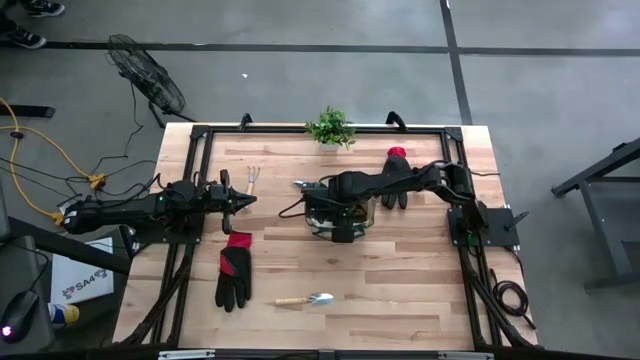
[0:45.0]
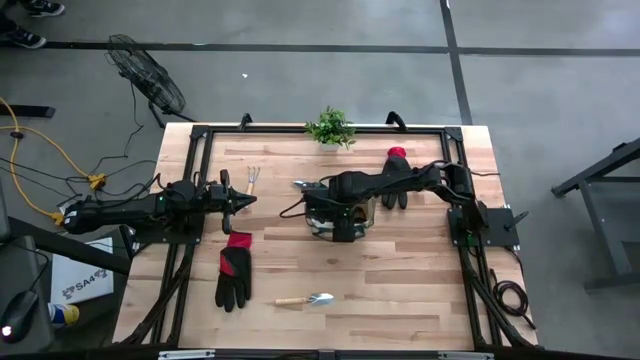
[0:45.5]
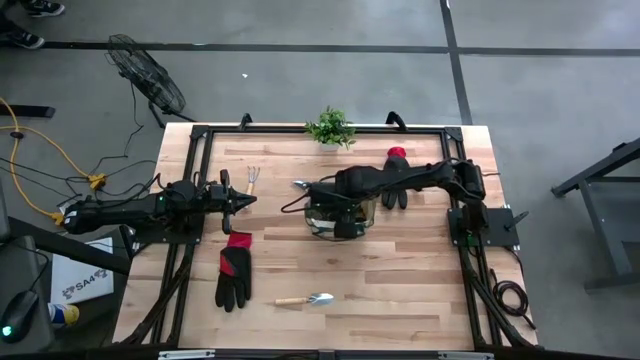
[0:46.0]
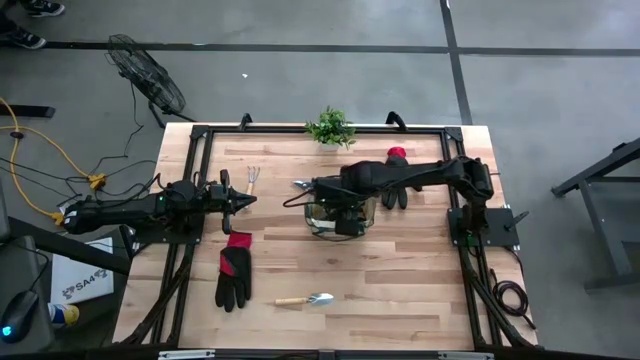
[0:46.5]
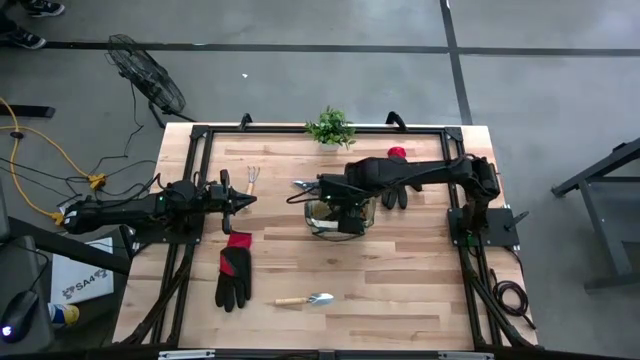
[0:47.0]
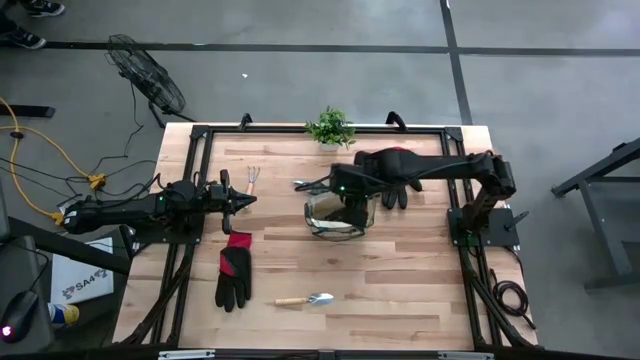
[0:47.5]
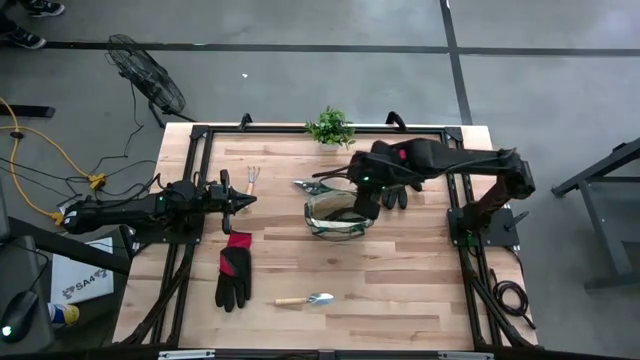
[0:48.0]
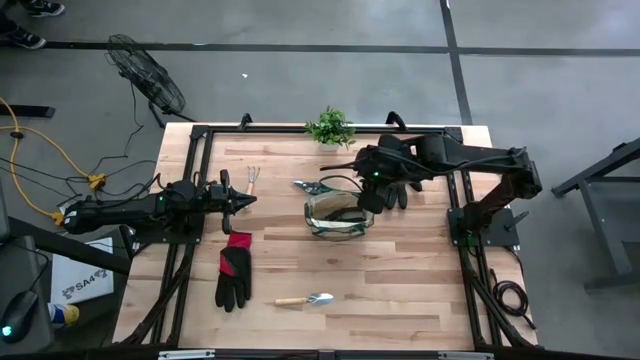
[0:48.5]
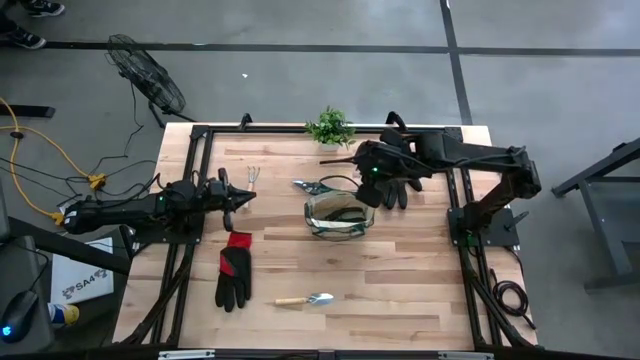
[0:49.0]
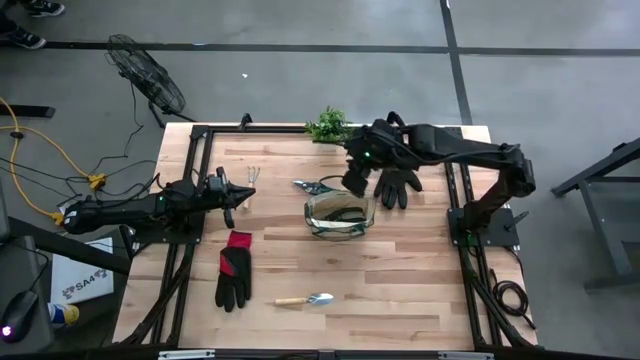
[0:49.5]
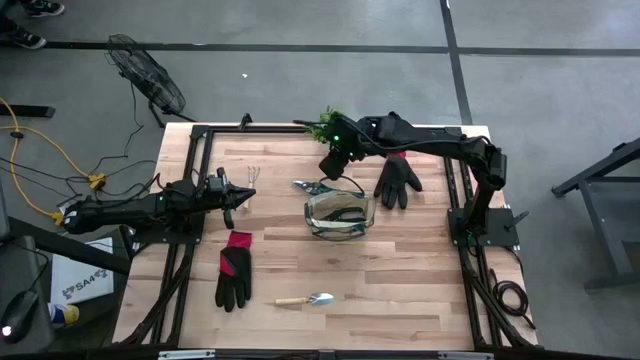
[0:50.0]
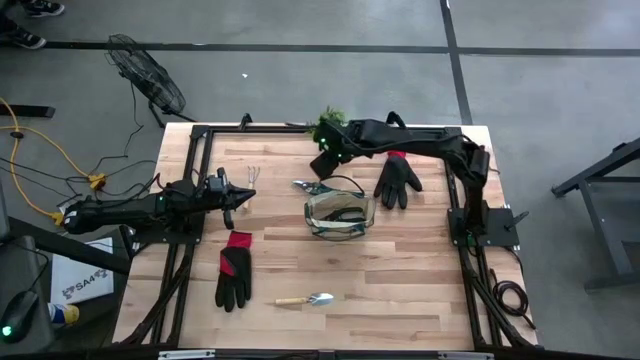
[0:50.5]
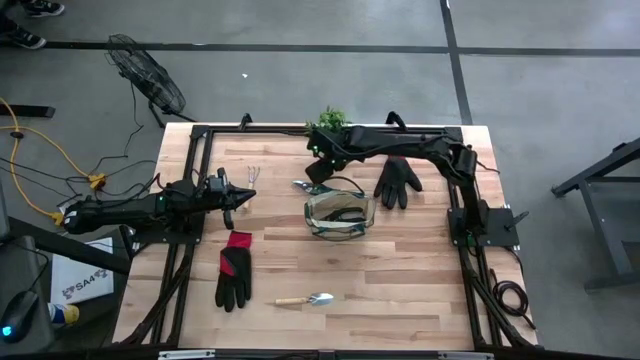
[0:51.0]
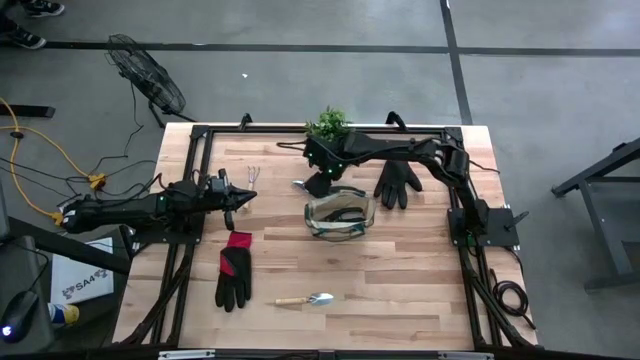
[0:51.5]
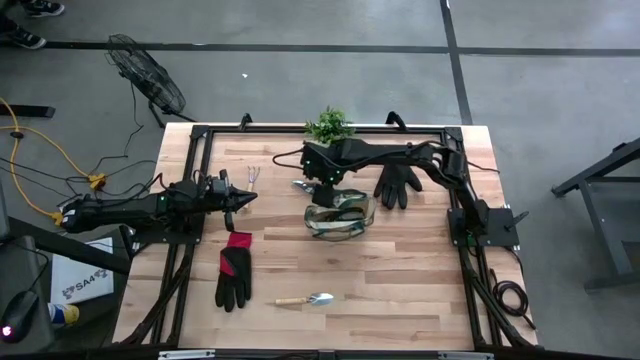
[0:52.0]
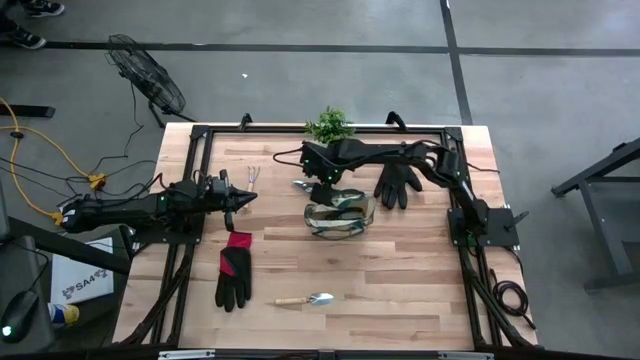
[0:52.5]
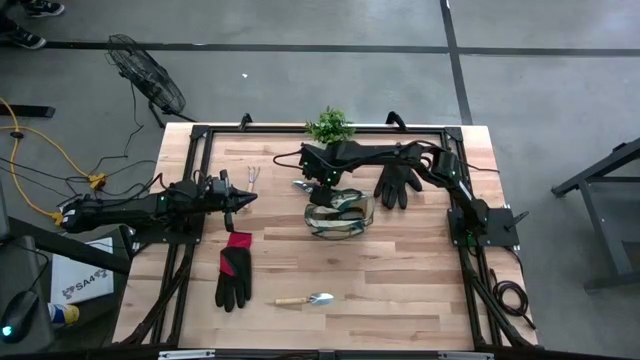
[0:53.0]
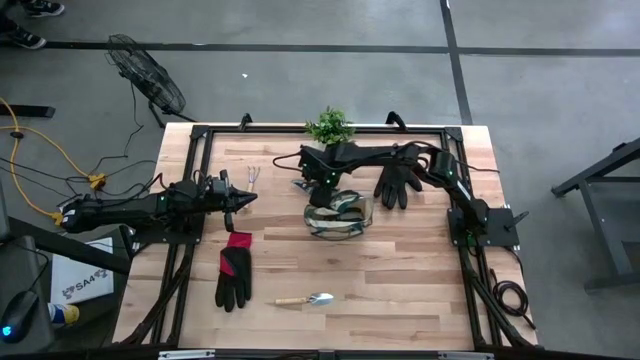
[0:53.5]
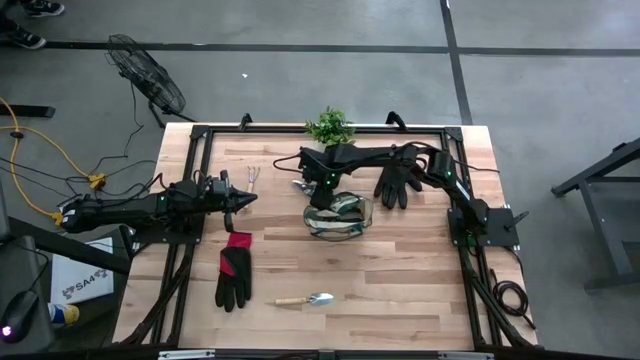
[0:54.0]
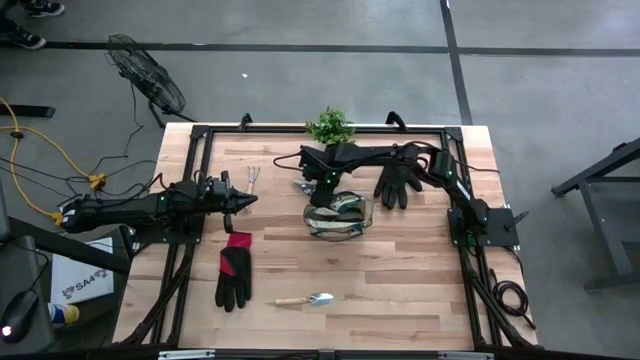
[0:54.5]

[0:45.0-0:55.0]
Task: Pick & Place Garden tools in Gardening bag
Put the green shear scissors into the gardening bag

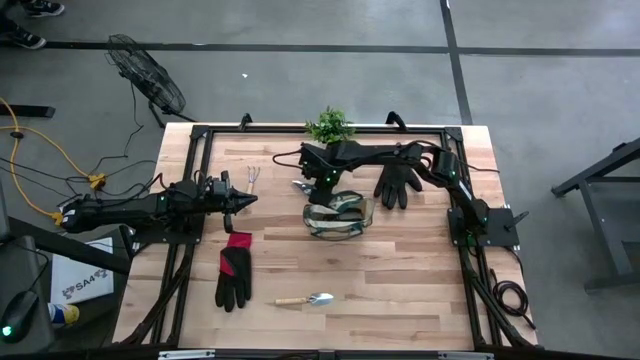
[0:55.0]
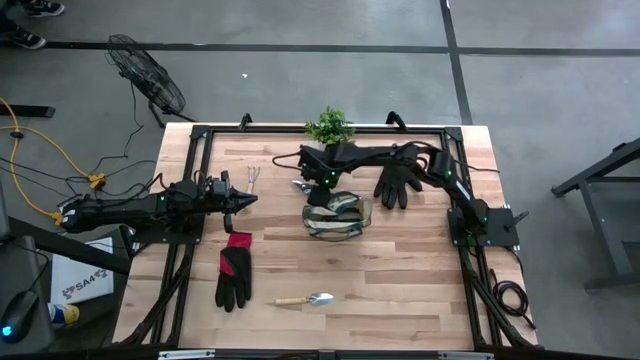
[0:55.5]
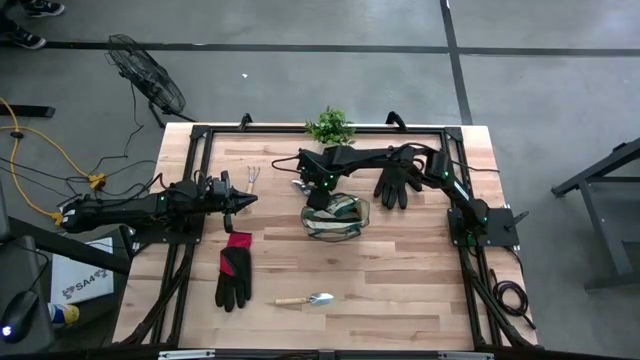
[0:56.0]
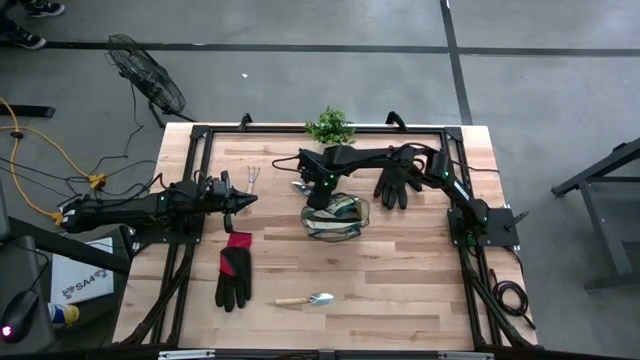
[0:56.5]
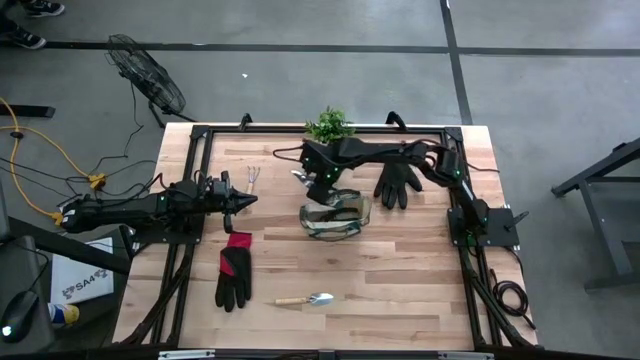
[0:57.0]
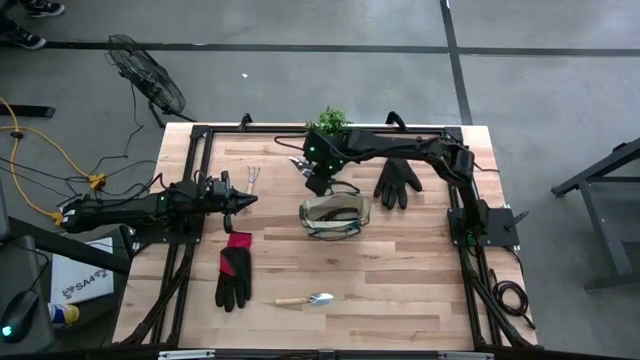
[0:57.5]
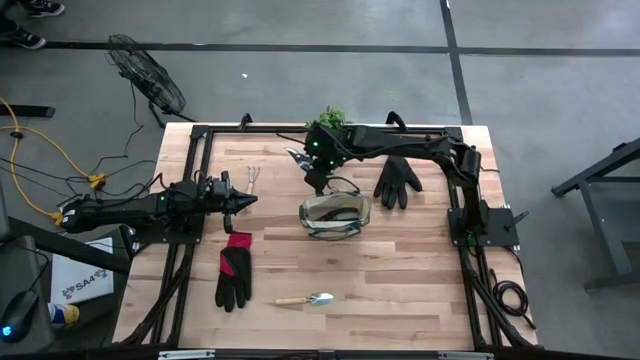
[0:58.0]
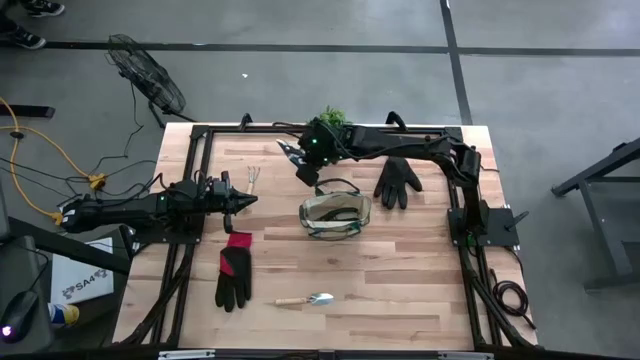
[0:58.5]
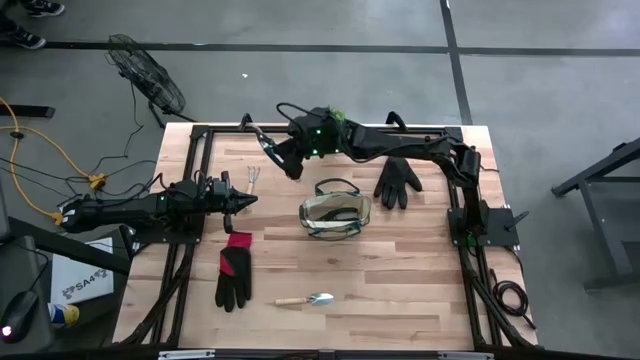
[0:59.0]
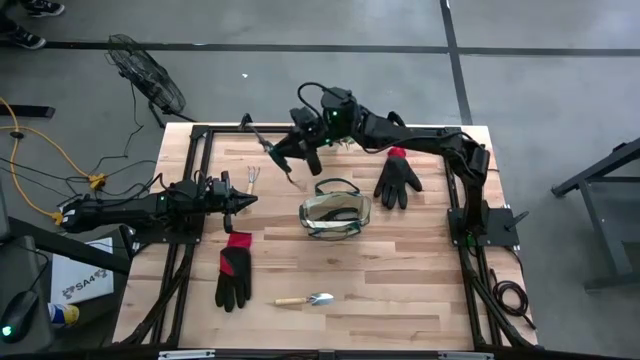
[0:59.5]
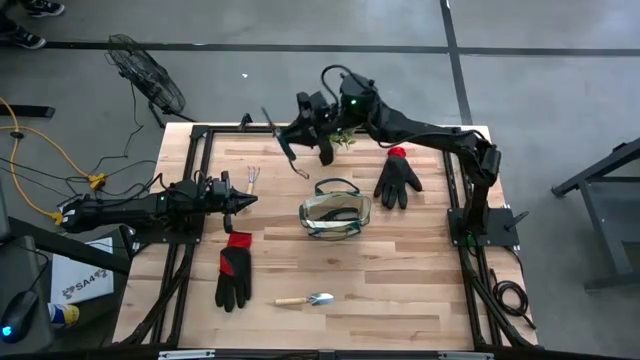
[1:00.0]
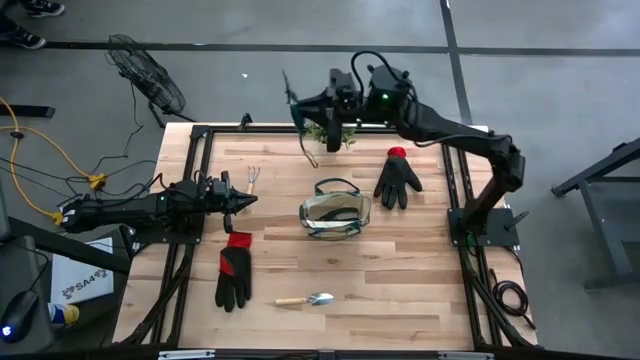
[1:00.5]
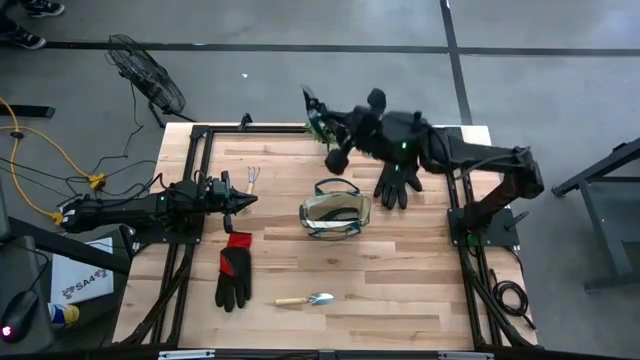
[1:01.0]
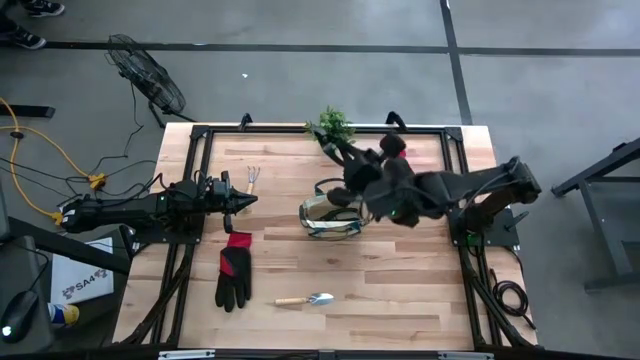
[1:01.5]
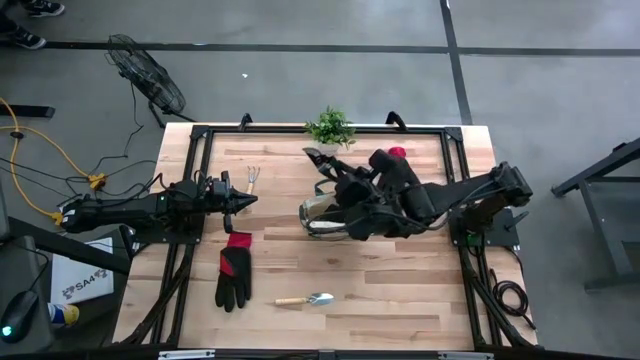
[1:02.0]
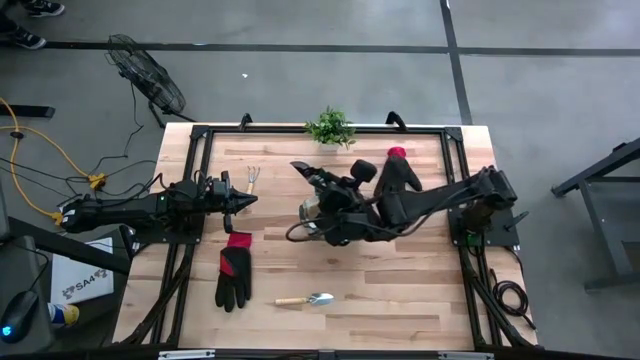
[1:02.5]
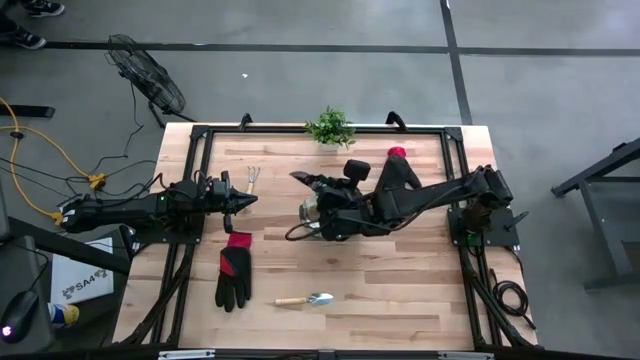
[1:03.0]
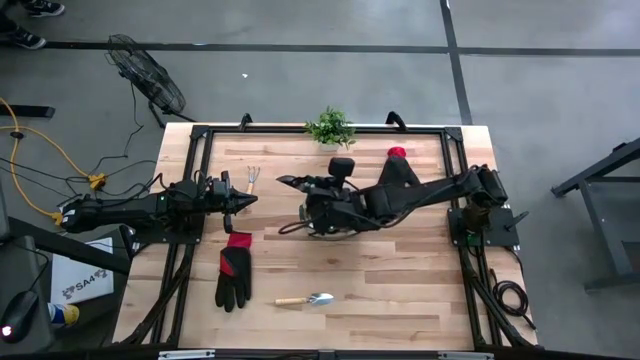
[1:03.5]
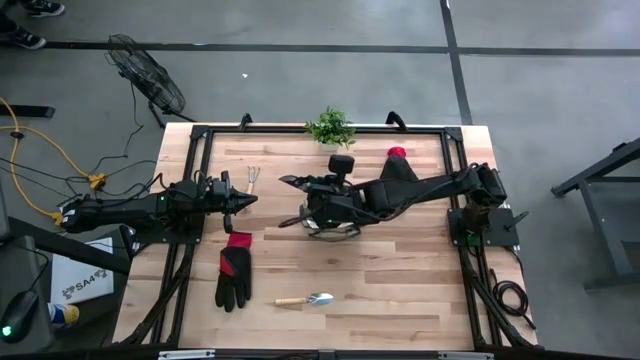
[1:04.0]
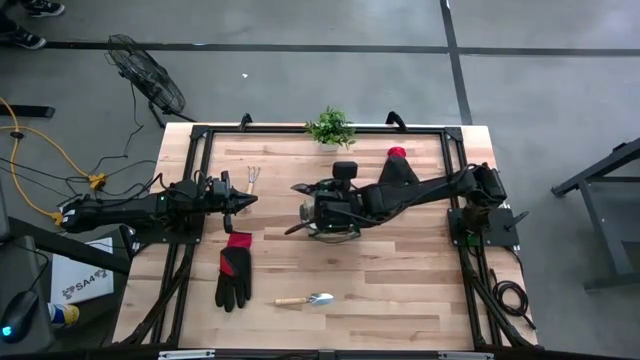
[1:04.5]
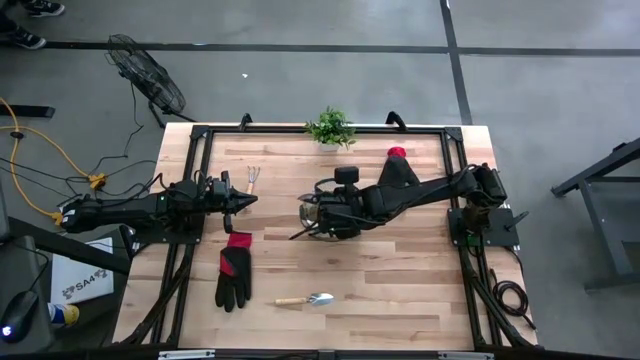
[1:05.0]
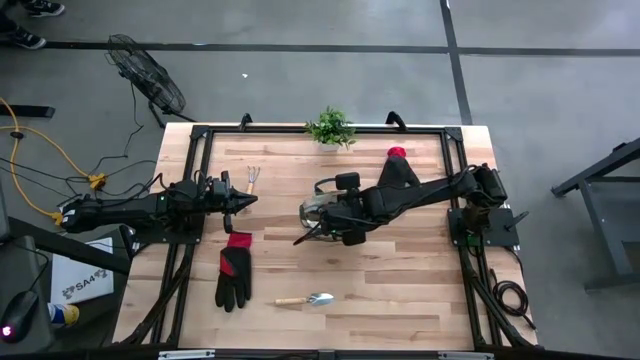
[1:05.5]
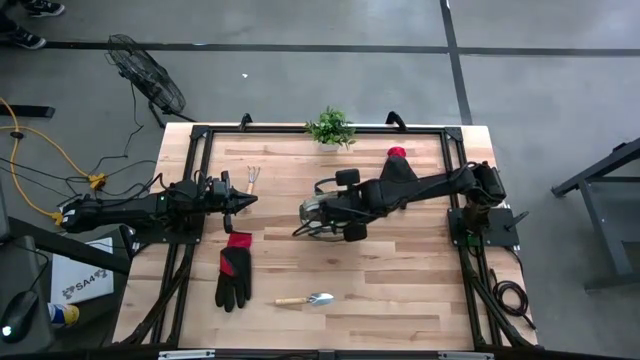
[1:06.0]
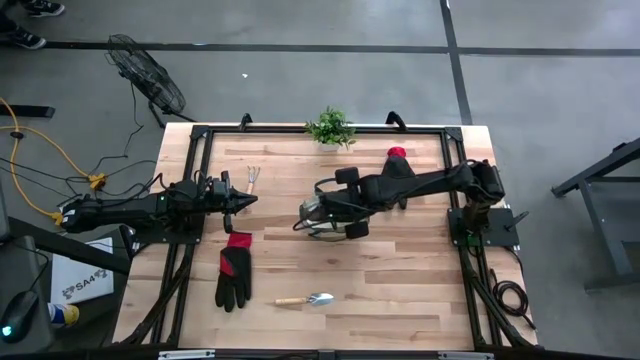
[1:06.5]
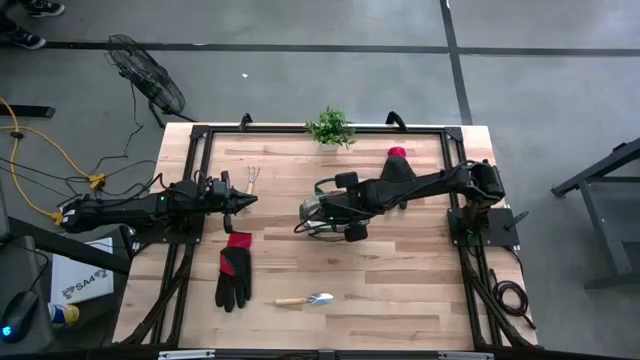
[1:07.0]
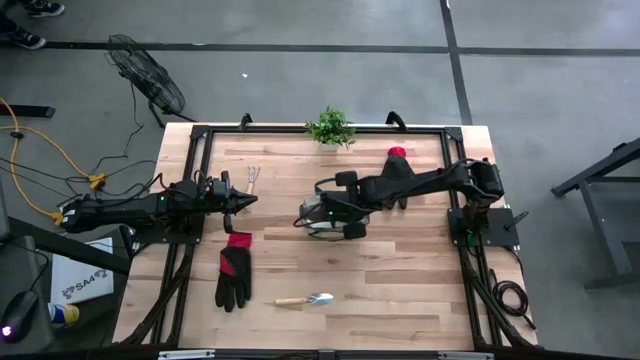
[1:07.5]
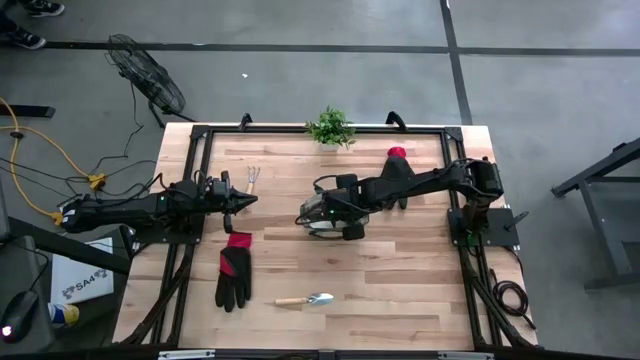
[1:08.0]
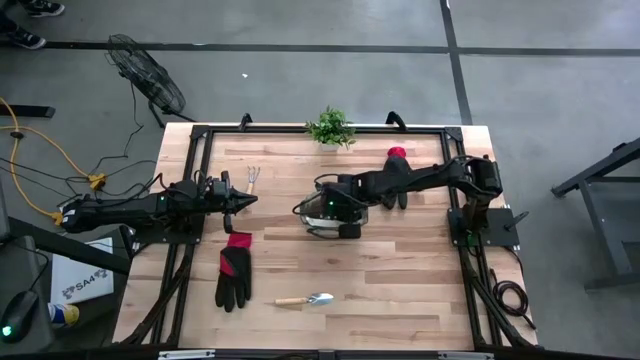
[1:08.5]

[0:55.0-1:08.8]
Put the green shear scissors into the gardening bag
